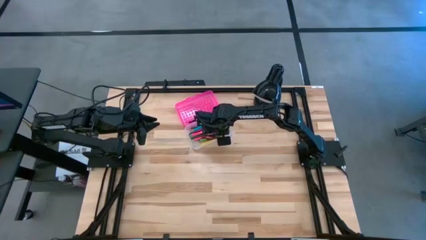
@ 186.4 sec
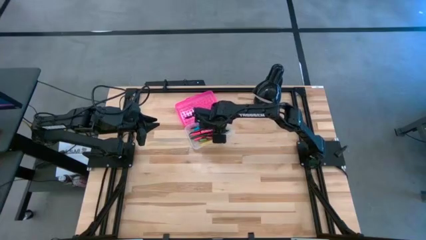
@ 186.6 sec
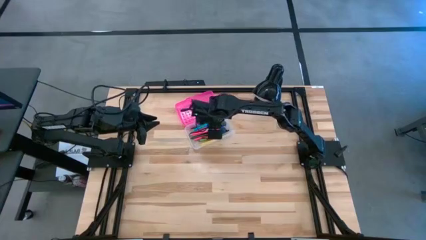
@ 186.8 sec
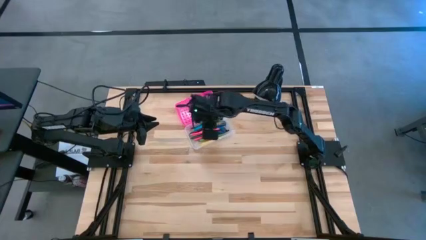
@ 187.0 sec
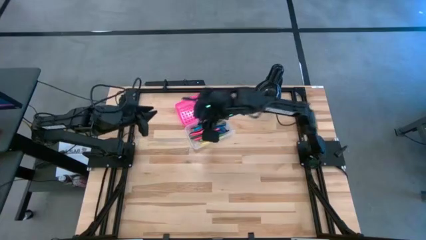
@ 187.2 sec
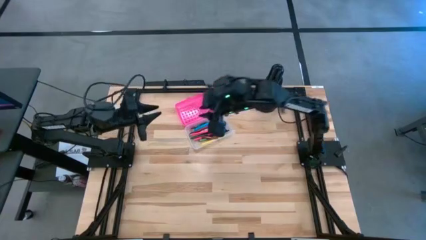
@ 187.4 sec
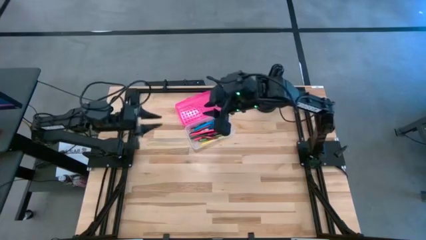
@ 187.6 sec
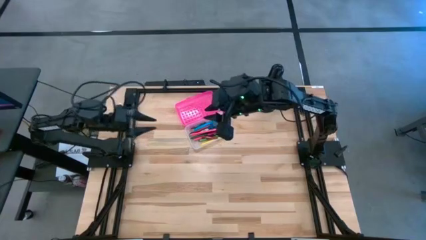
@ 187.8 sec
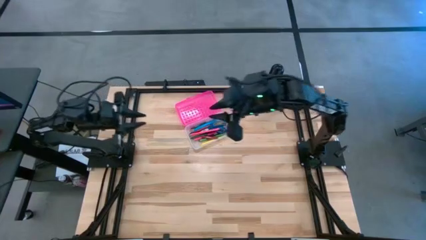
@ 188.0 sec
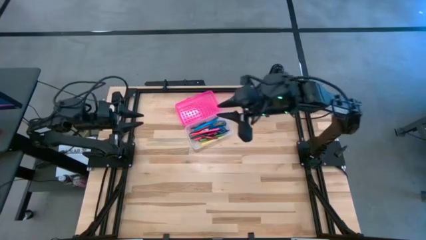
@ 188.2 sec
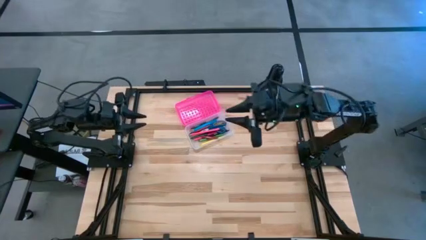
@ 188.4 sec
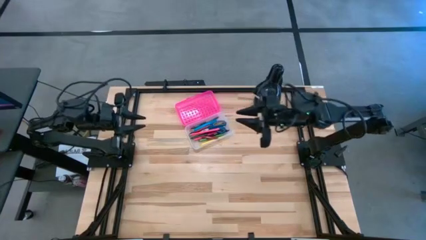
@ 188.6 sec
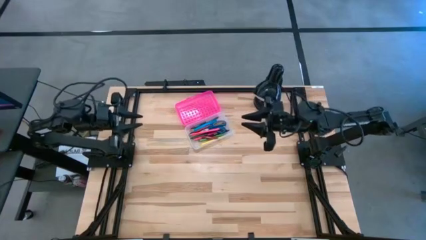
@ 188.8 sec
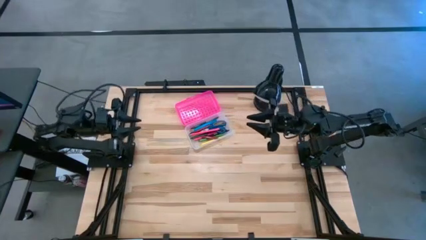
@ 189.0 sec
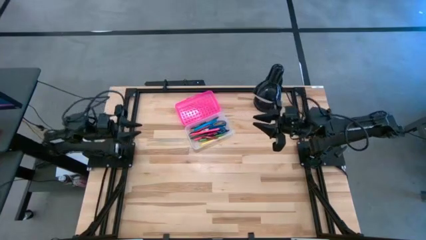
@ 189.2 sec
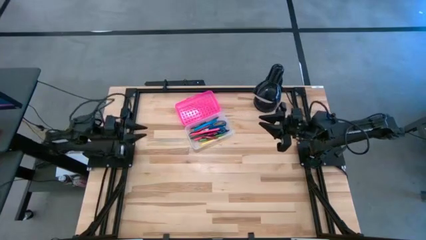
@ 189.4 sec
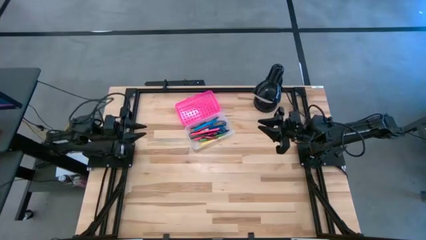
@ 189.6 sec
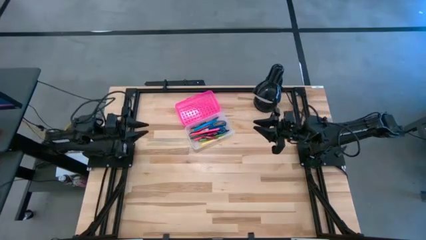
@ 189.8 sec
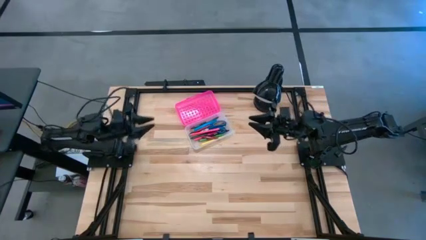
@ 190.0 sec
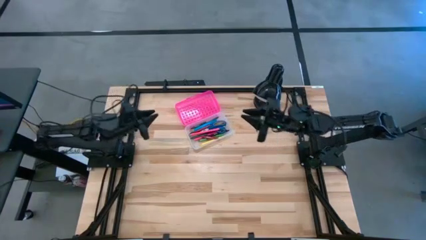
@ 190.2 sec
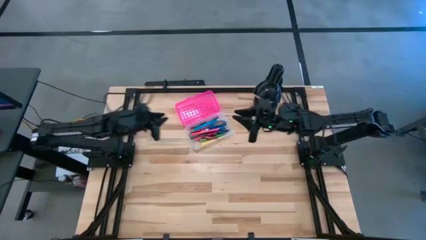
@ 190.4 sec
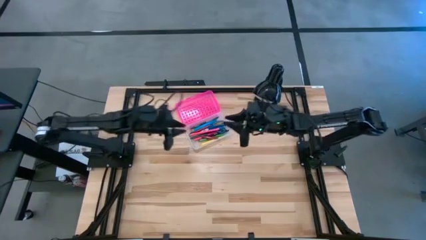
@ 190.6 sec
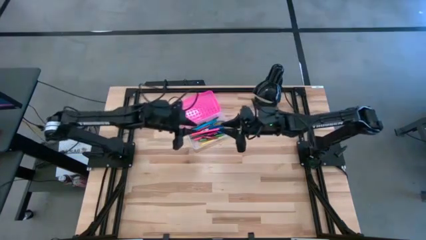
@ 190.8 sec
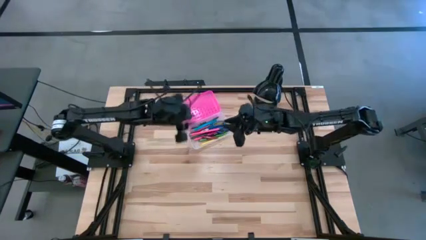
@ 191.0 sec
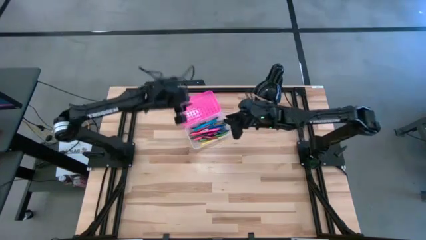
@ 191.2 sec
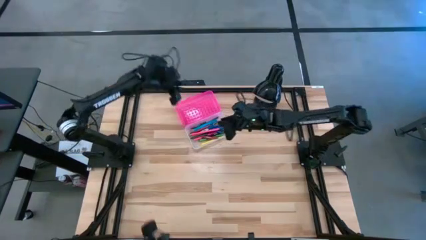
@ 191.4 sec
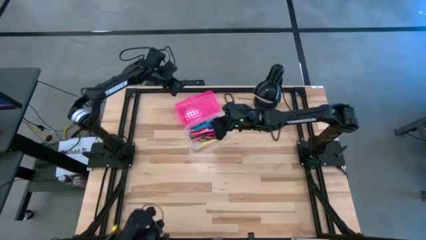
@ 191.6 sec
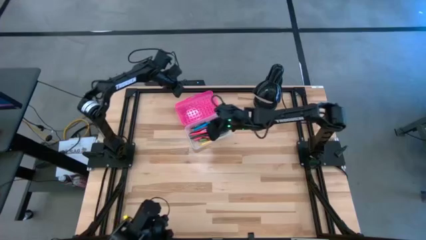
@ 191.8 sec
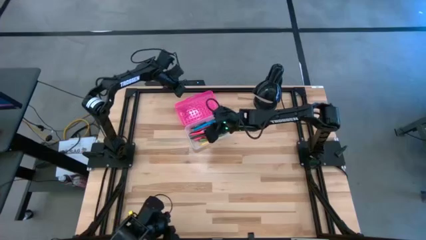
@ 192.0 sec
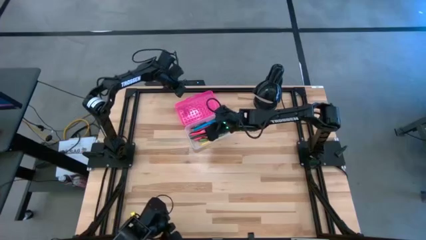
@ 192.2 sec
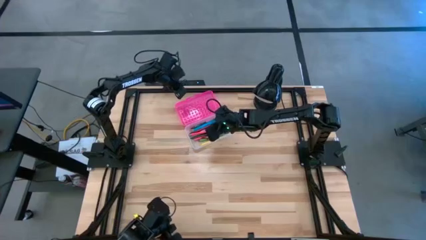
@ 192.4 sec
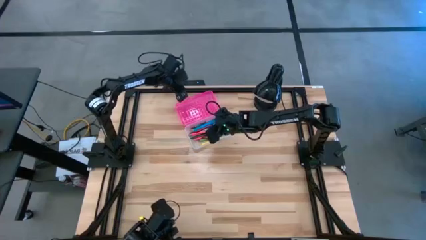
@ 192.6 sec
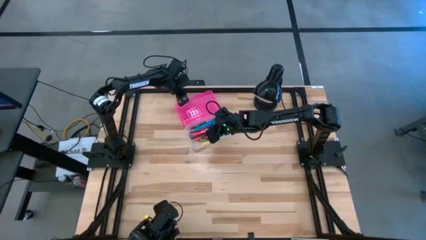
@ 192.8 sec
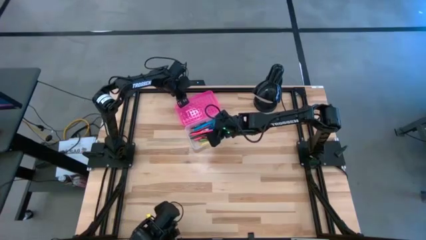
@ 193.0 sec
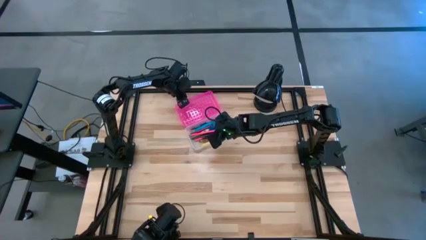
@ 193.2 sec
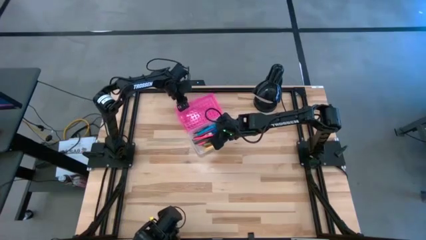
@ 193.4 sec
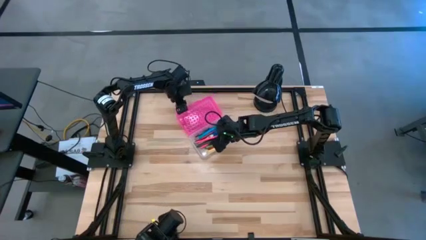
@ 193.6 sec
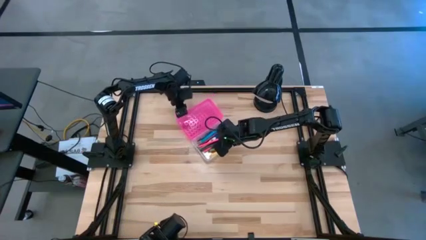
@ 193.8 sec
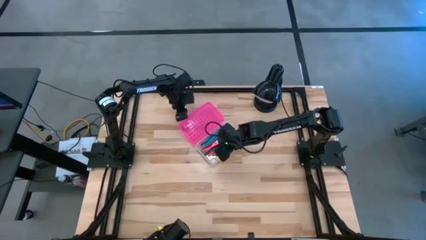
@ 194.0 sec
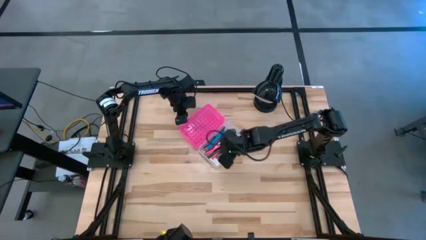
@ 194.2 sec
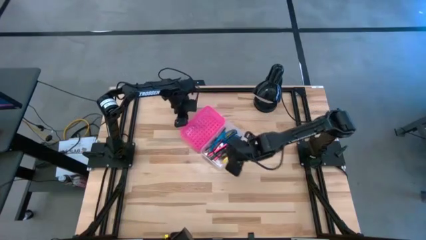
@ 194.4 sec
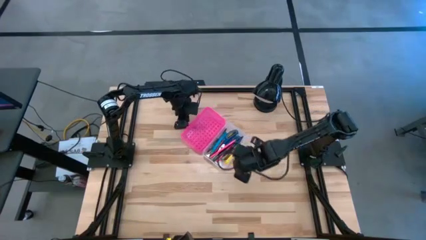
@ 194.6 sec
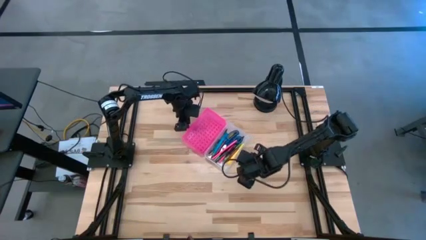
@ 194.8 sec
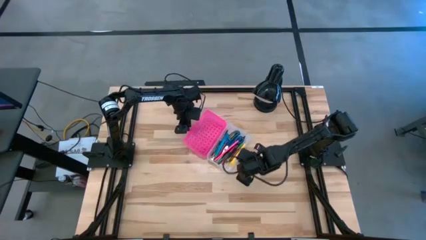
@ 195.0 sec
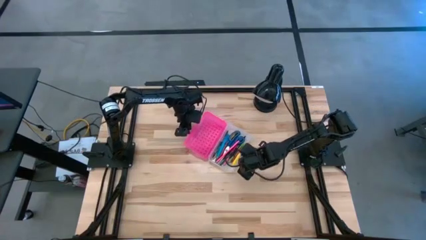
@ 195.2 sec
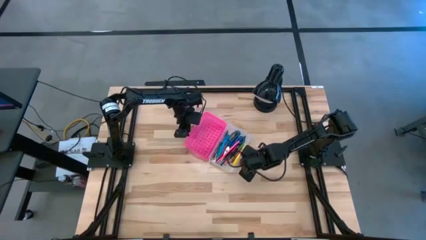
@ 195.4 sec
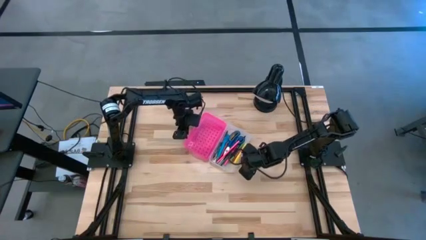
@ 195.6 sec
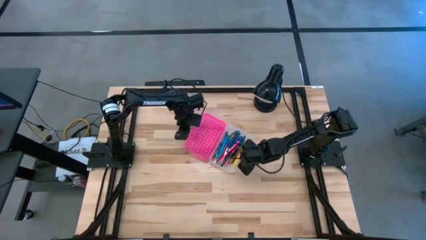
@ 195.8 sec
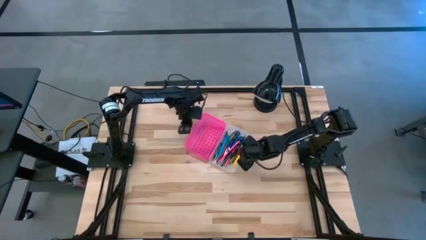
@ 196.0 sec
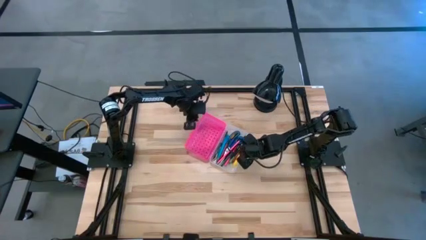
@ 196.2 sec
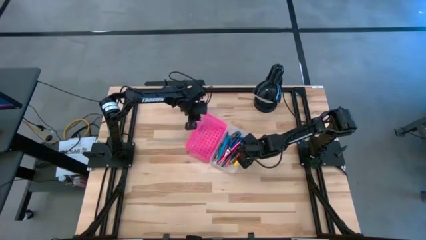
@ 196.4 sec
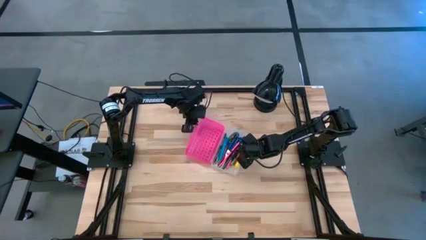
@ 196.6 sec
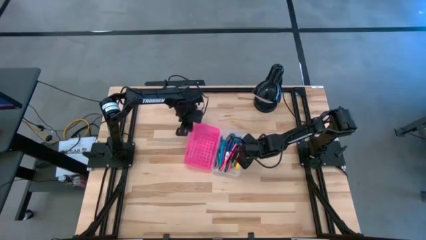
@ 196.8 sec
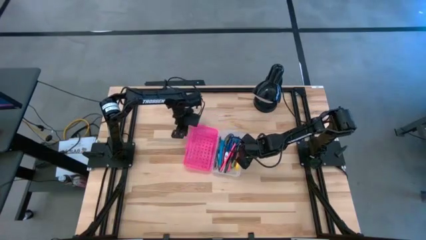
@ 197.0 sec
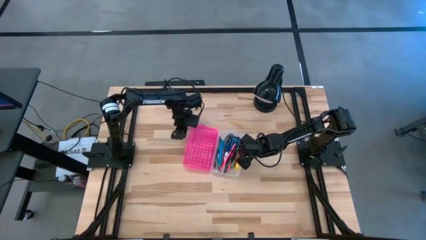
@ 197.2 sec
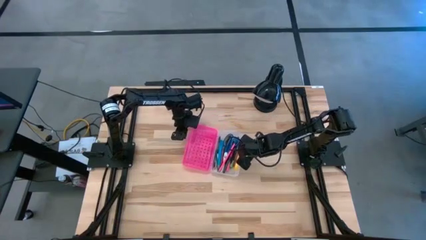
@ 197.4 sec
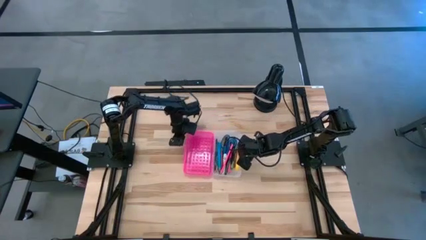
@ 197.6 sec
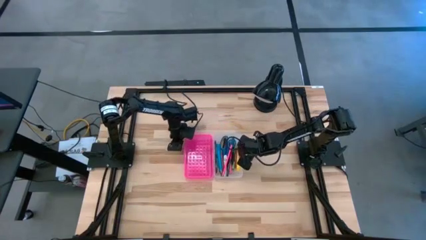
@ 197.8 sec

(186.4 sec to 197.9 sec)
Task: Pick & place school supplies into a supply box
Move the pink supply box to the center of the table

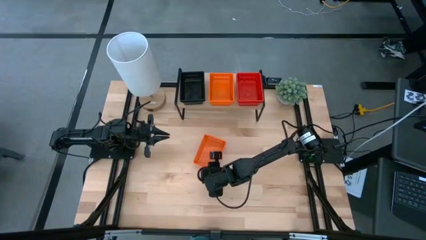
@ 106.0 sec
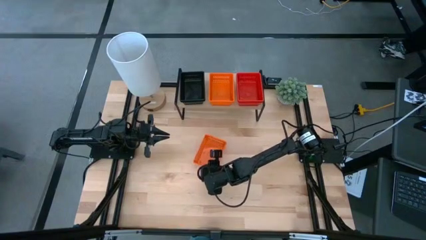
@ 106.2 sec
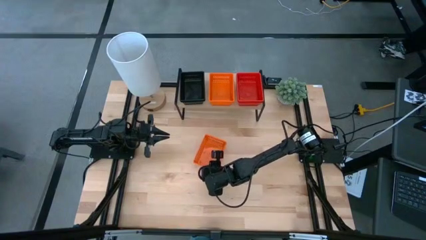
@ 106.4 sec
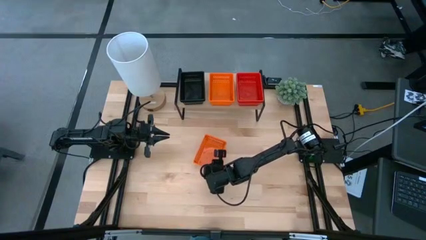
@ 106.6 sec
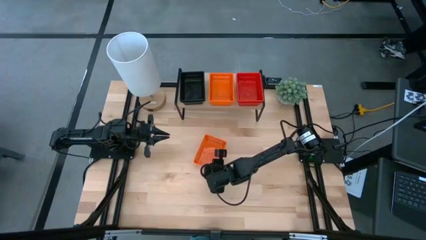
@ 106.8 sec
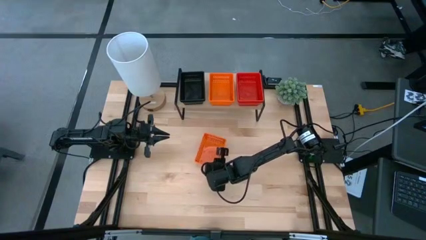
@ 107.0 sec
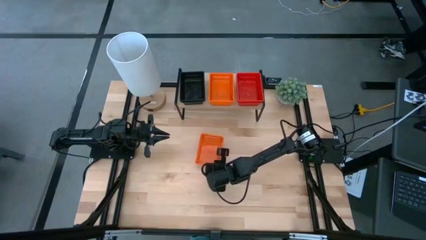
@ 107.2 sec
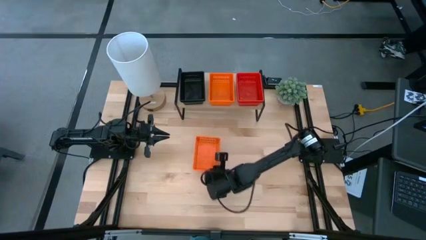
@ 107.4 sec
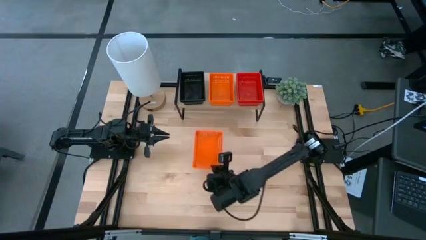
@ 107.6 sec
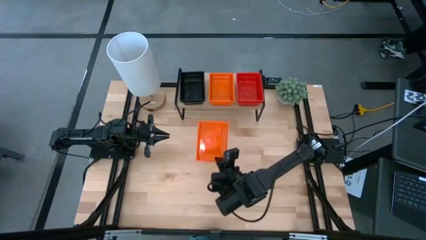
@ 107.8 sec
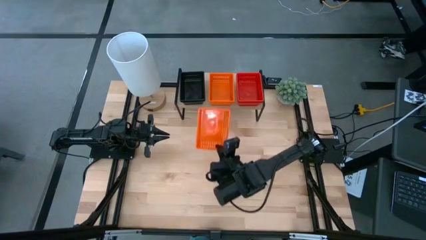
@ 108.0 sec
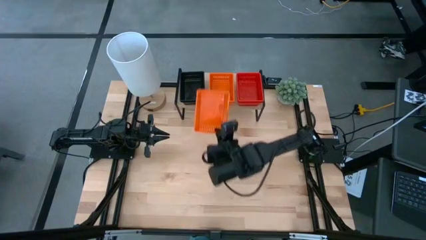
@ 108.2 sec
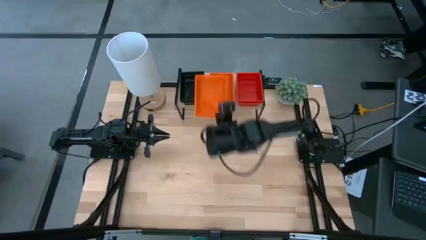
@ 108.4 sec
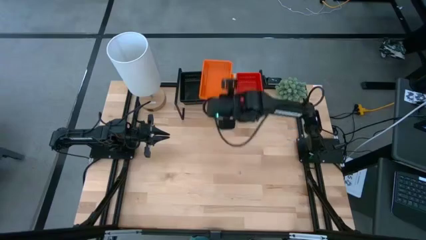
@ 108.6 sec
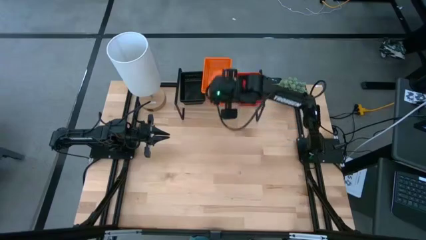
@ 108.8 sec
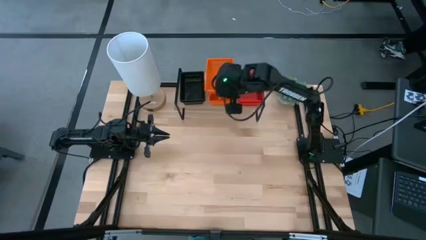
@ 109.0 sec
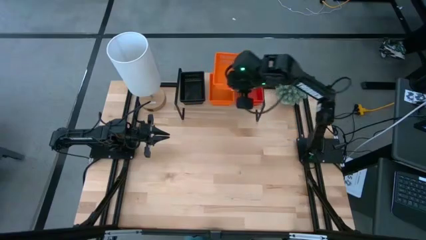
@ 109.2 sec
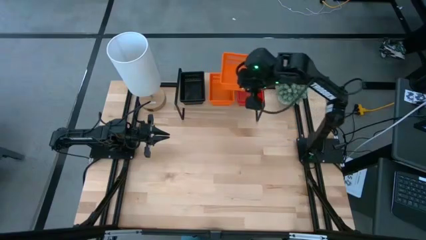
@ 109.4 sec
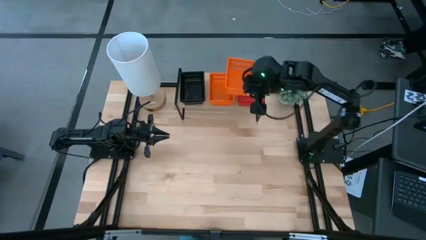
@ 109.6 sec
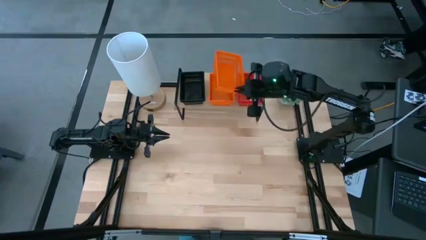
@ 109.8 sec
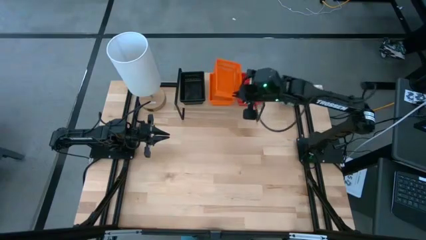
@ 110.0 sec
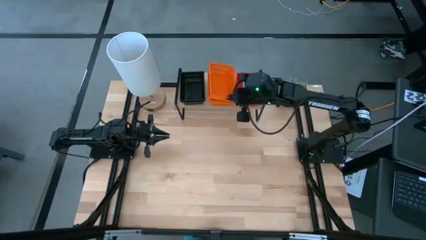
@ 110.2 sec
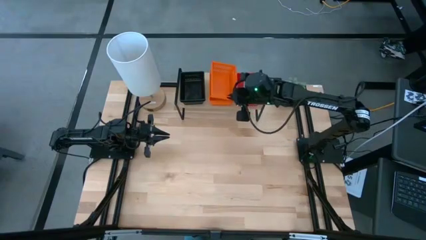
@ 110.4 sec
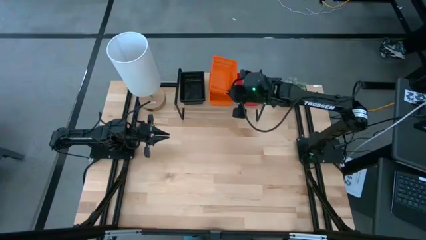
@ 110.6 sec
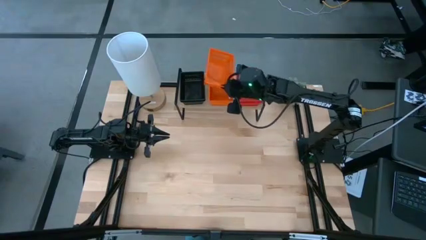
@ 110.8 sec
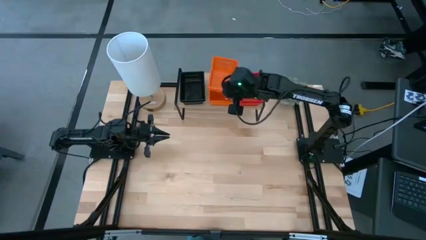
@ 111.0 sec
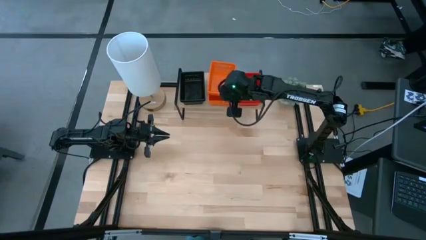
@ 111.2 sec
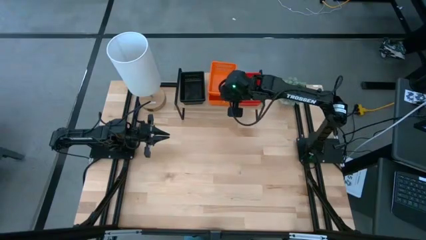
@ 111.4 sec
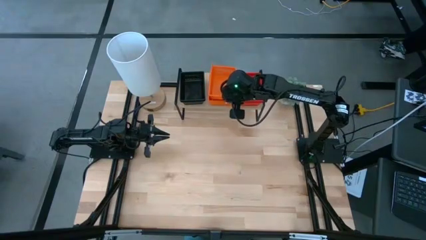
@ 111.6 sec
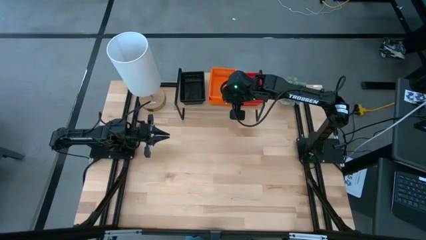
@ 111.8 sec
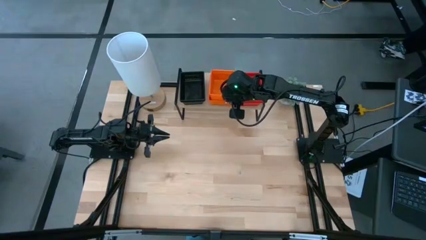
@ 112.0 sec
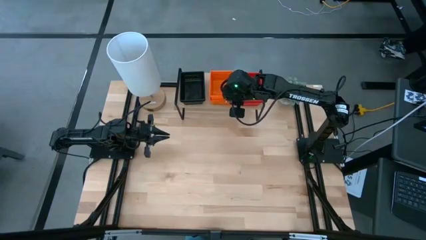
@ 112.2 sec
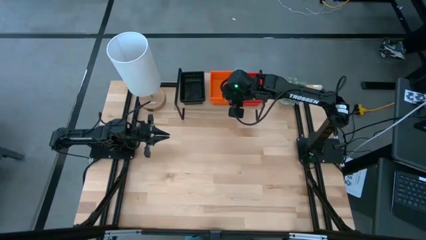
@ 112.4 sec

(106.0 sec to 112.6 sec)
Task: Stack baskets on shelf by color
Stack the orange basket on top of the stacked orange baskets on the shelf
